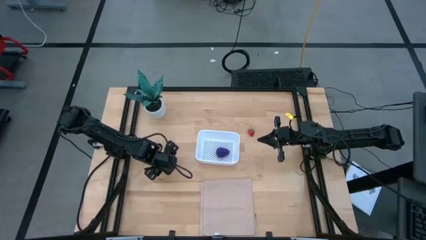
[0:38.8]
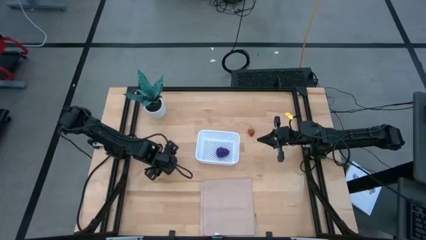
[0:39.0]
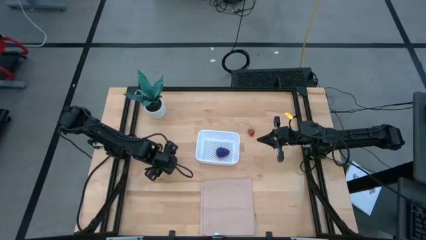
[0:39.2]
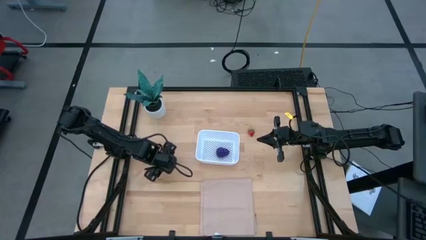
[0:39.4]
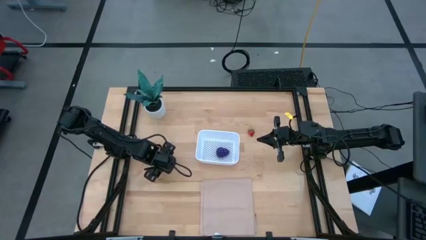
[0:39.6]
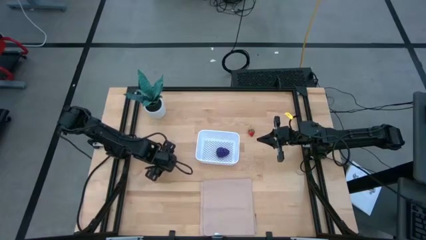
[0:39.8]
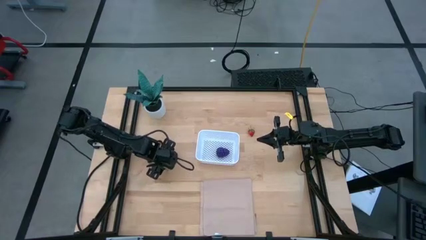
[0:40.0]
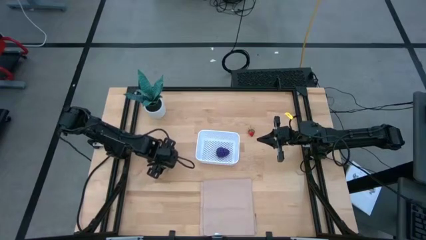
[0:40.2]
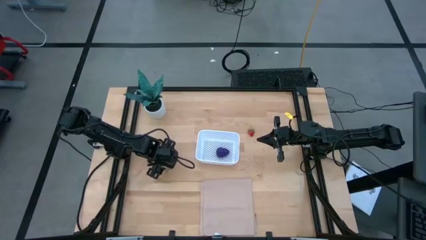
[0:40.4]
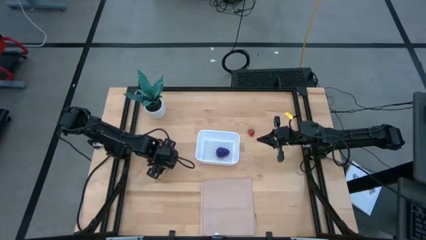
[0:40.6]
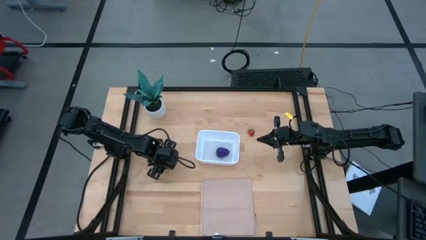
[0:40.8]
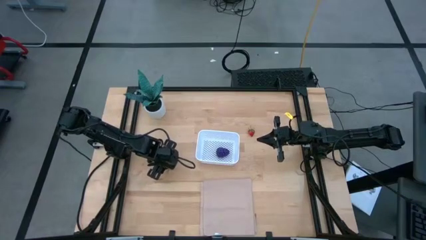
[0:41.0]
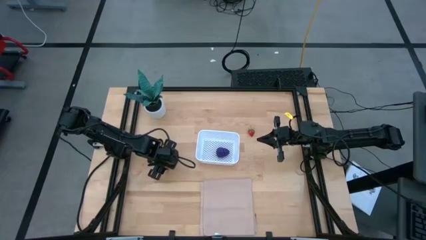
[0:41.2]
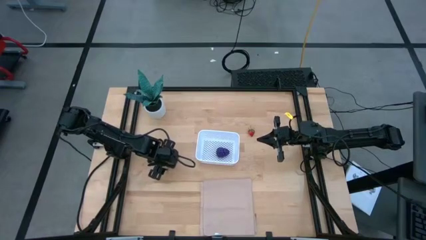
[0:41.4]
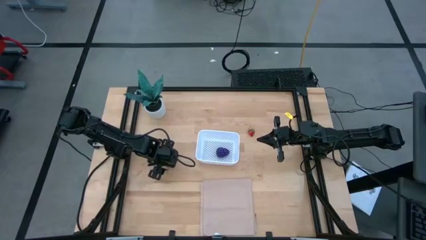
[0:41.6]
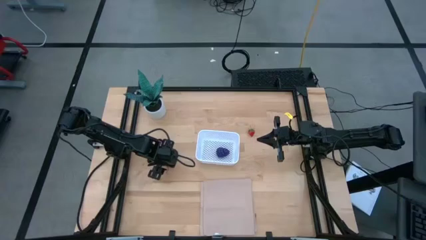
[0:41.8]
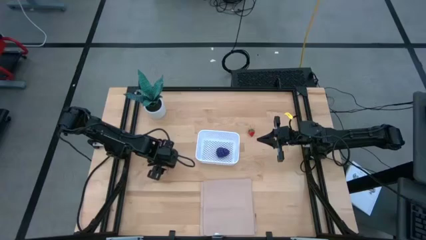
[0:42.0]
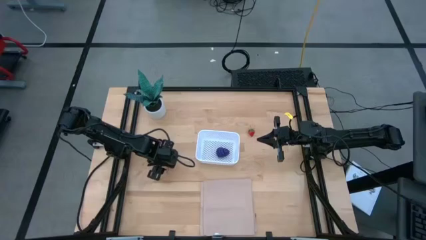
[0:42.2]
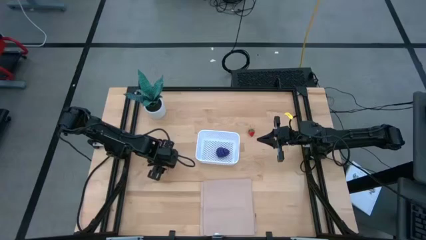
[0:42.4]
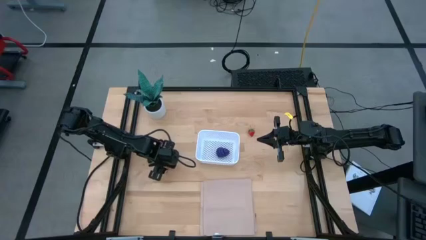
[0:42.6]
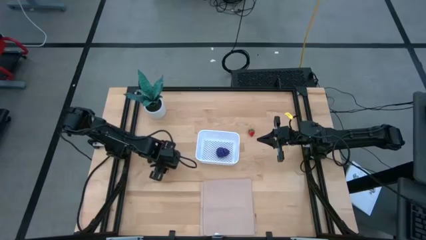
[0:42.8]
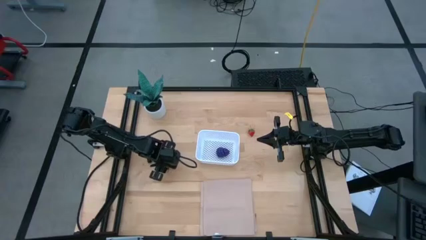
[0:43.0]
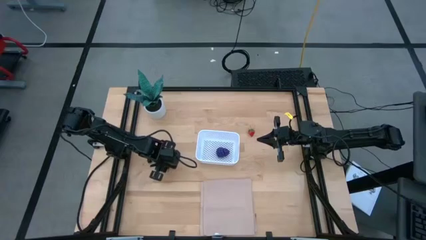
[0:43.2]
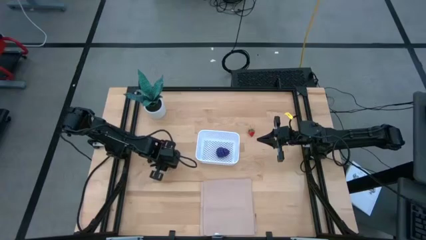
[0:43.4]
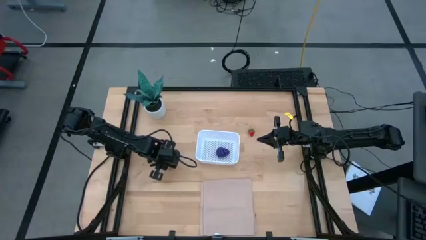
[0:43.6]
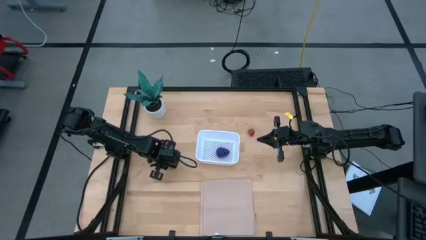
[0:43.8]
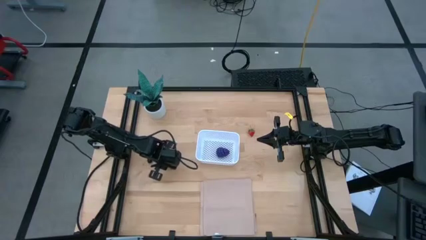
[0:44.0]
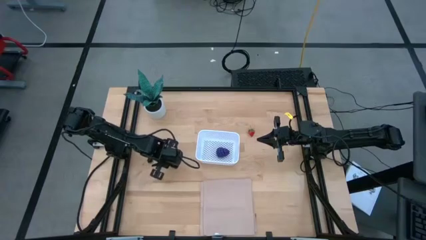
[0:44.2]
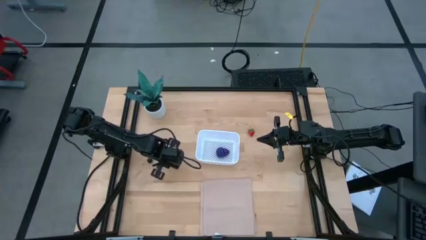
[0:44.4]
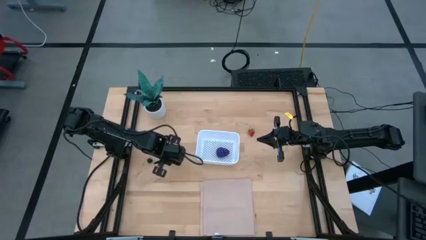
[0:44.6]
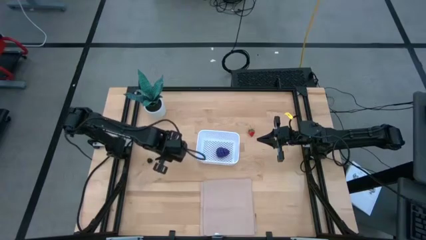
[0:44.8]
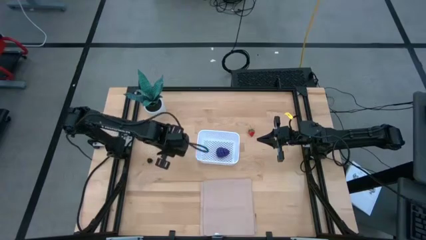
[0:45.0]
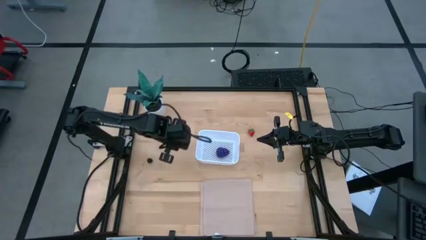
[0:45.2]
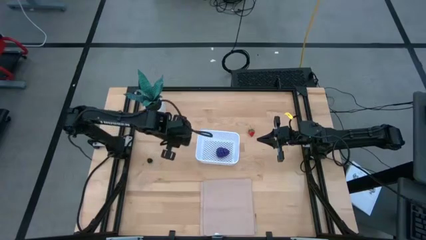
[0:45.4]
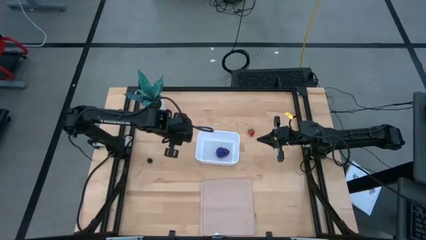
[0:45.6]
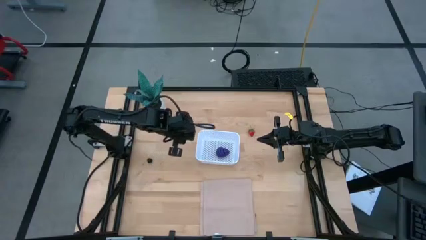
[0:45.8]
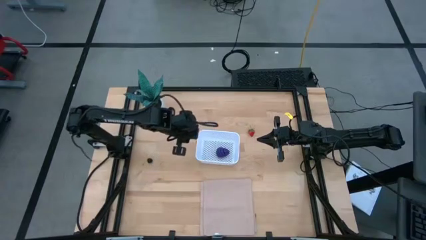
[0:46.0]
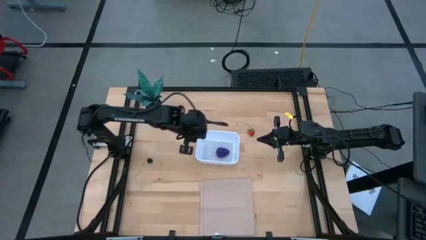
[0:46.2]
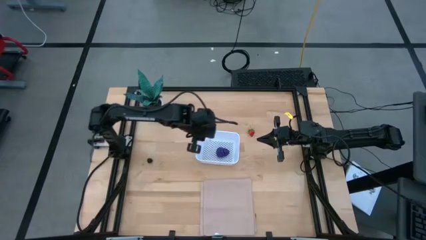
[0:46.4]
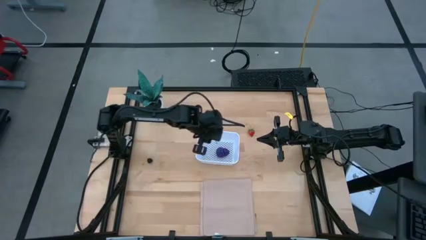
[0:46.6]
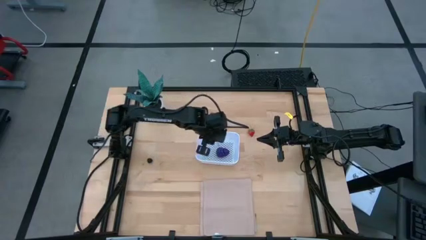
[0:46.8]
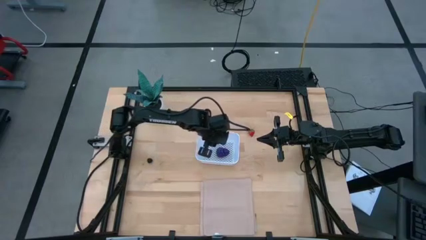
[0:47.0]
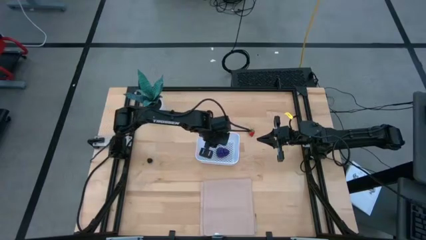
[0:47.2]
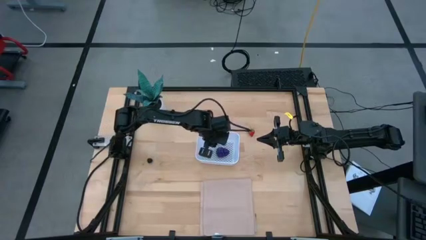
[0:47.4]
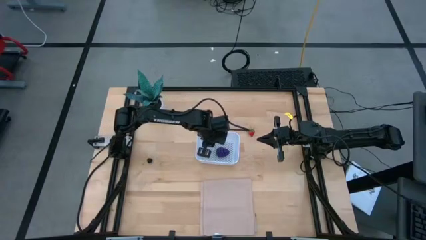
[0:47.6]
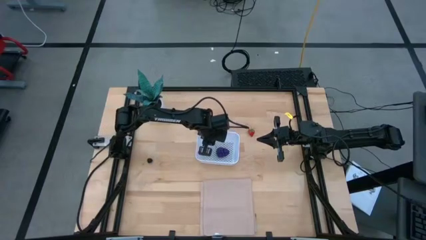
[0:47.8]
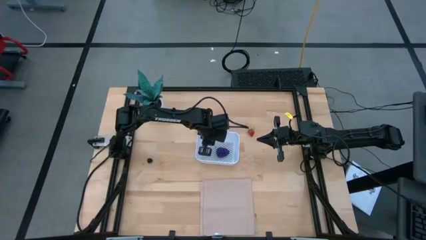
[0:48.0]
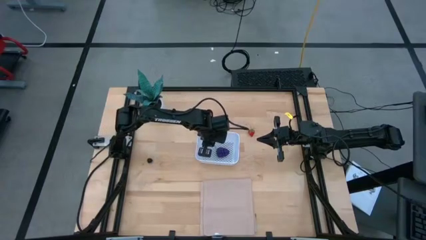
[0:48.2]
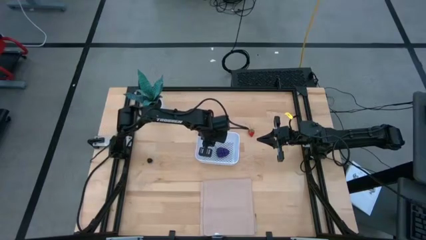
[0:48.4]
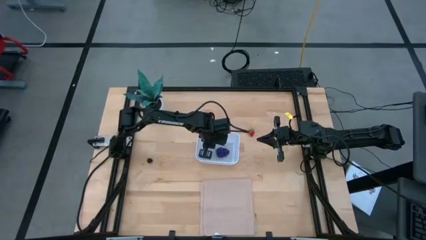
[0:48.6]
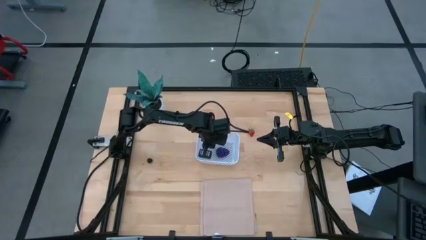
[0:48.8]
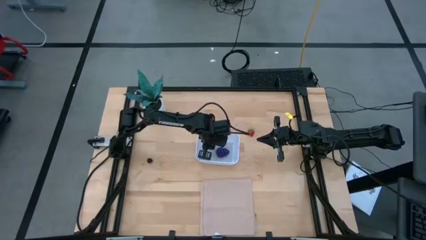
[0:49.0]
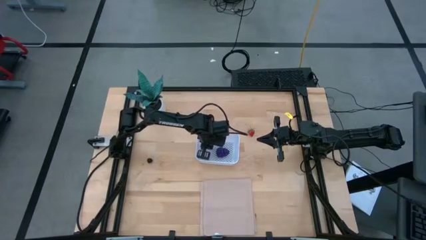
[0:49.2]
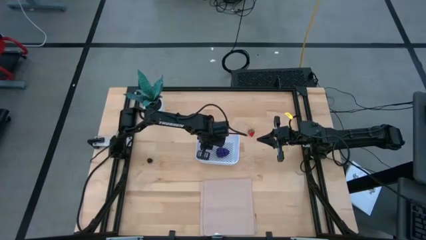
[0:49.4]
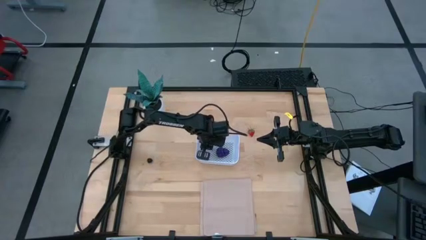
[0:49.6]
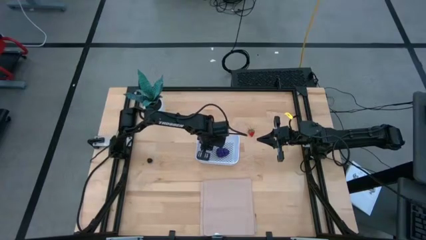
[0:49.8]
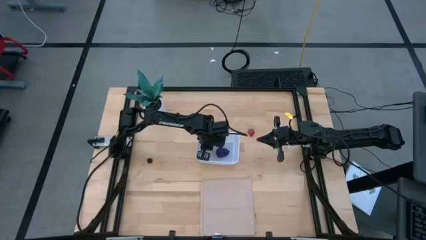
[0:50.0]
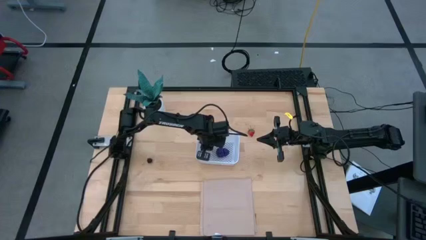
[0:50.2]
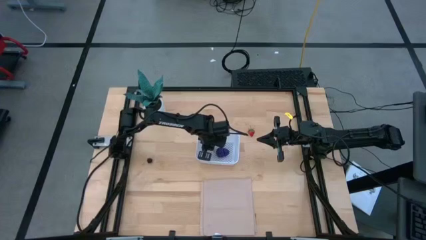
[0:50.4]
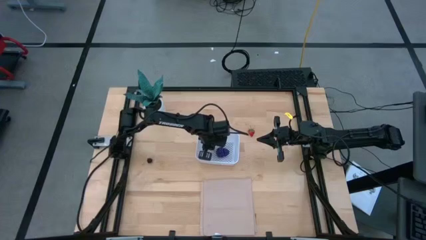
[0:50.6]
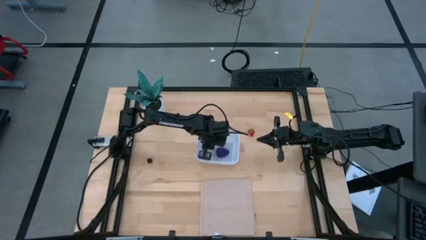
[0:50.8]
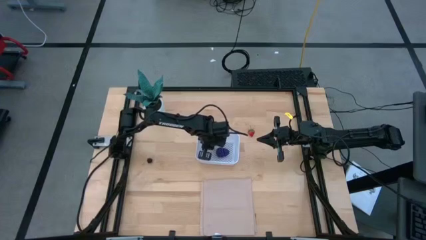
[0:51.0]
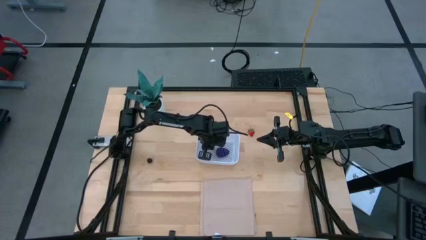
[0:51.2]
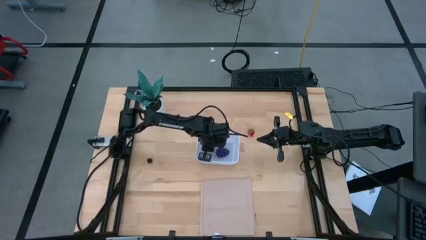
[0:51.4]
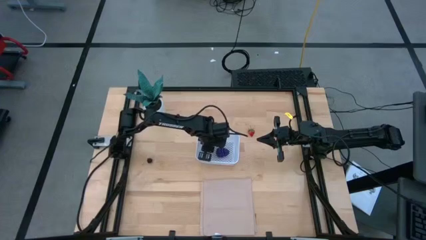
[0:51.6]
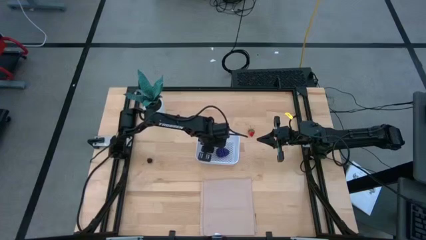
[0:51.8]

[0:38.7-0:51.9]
Task: Pick and placing Produce into tupperware
Put the red cherry into the white bin
